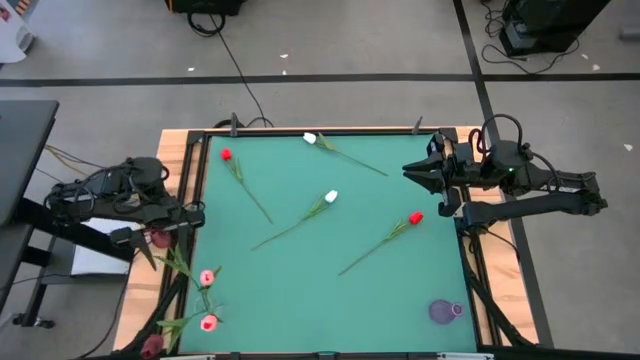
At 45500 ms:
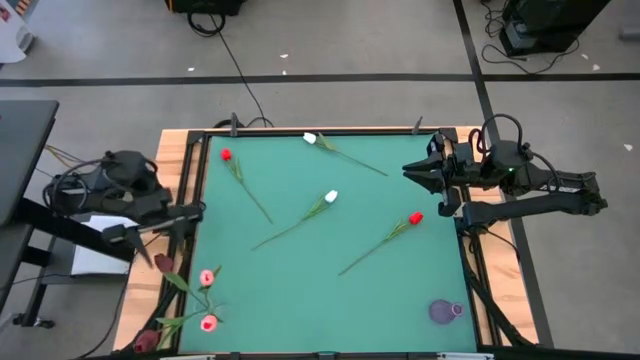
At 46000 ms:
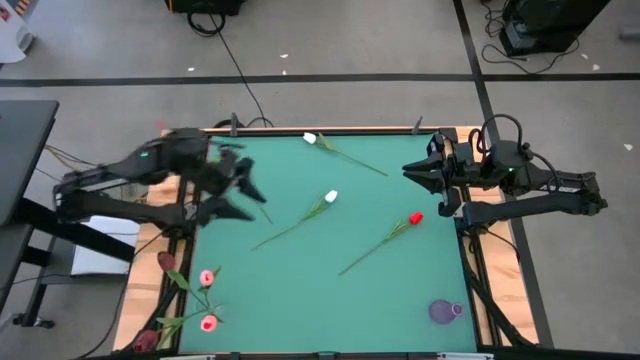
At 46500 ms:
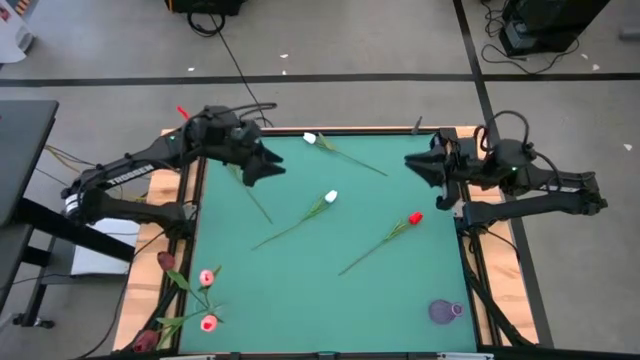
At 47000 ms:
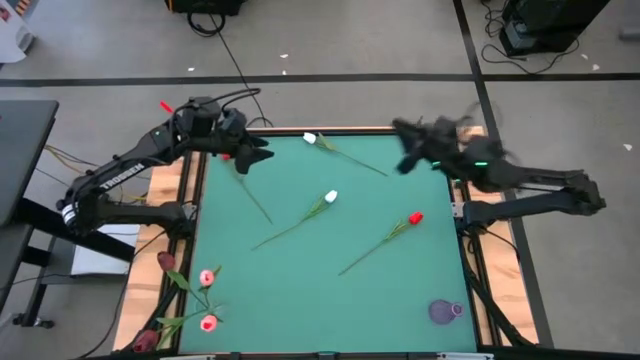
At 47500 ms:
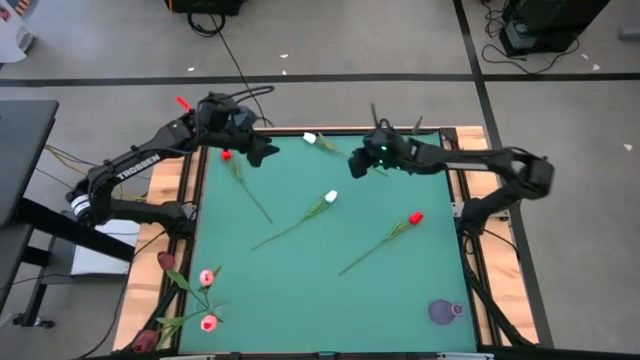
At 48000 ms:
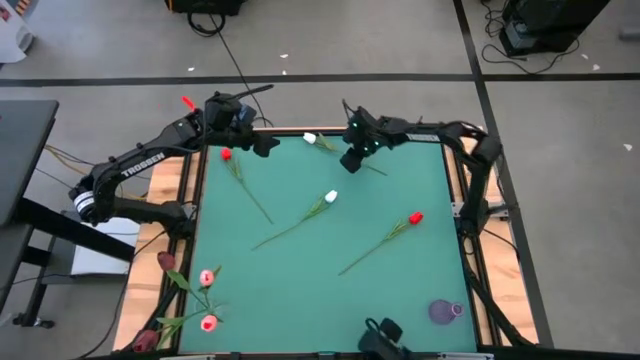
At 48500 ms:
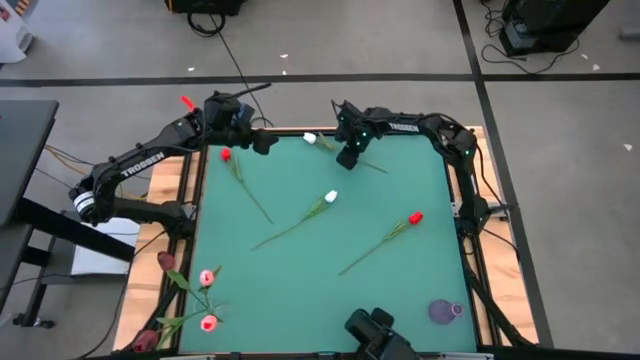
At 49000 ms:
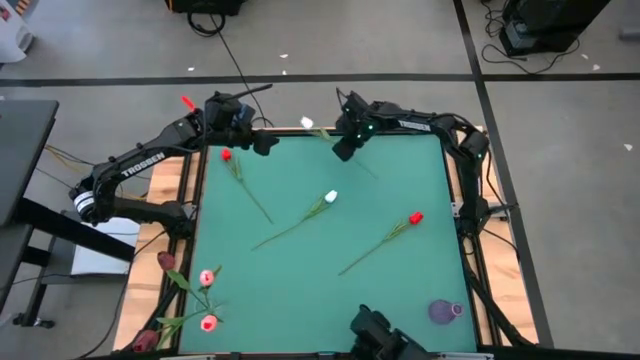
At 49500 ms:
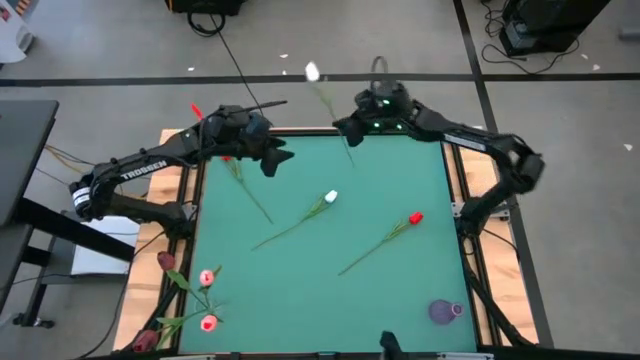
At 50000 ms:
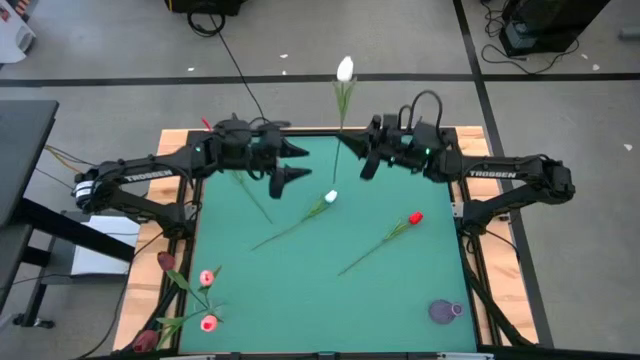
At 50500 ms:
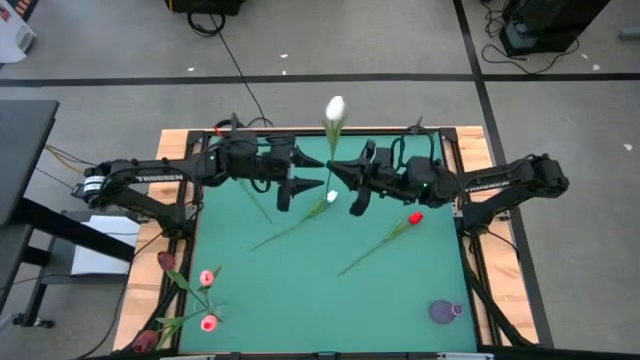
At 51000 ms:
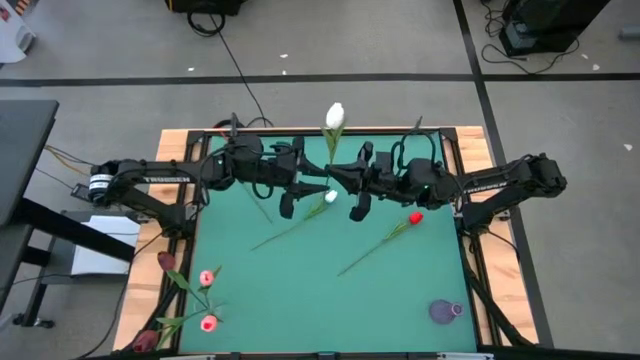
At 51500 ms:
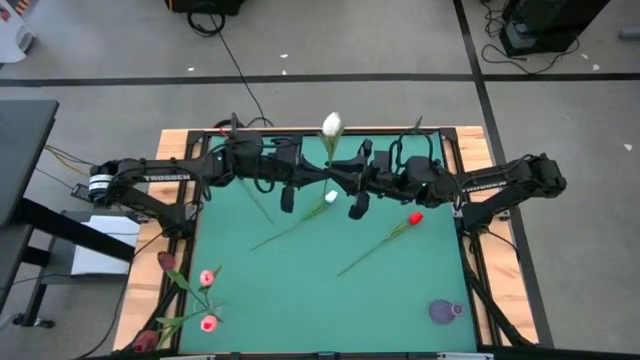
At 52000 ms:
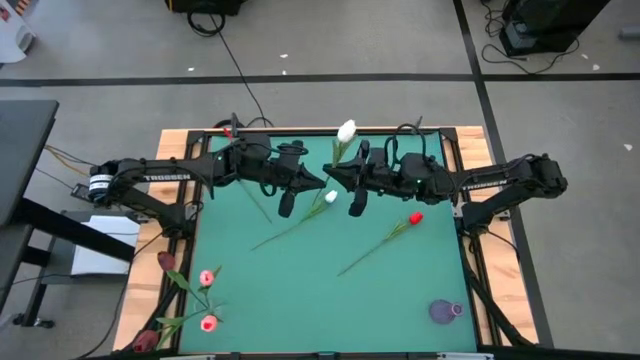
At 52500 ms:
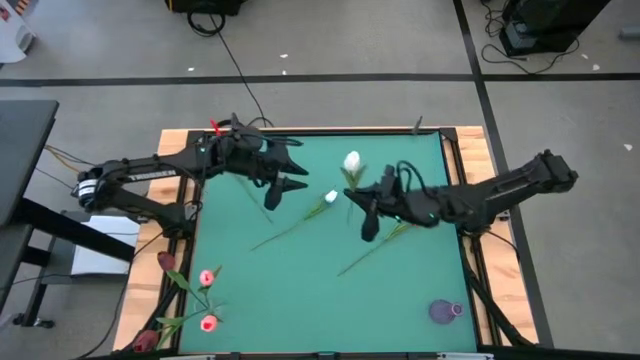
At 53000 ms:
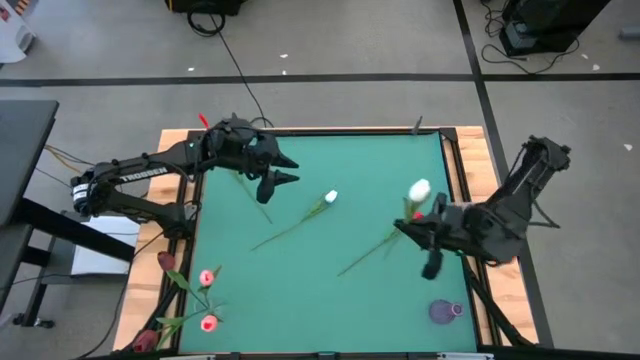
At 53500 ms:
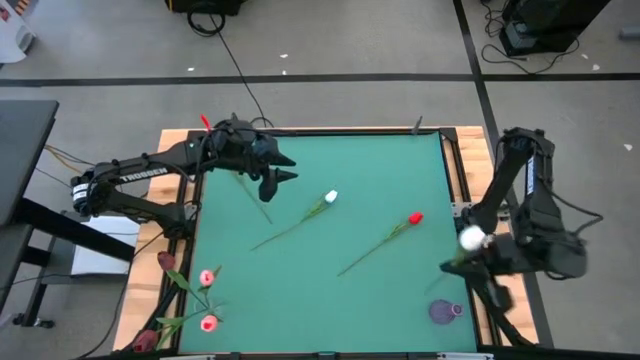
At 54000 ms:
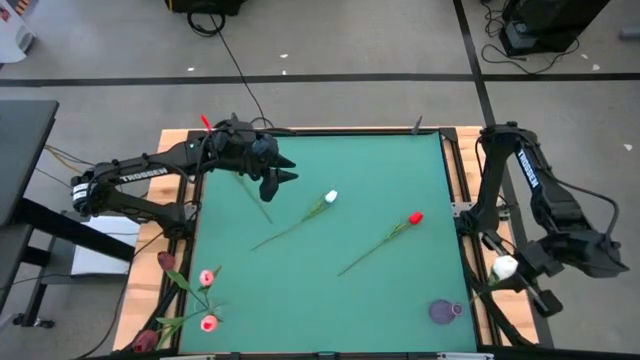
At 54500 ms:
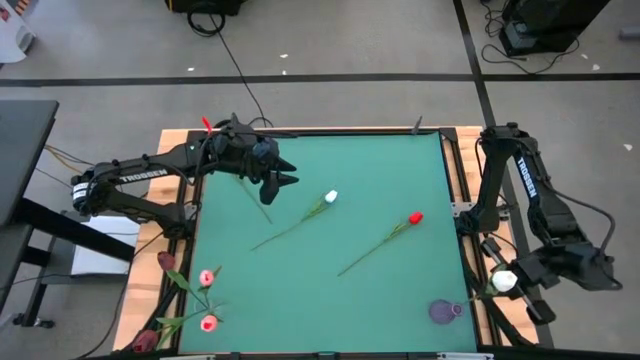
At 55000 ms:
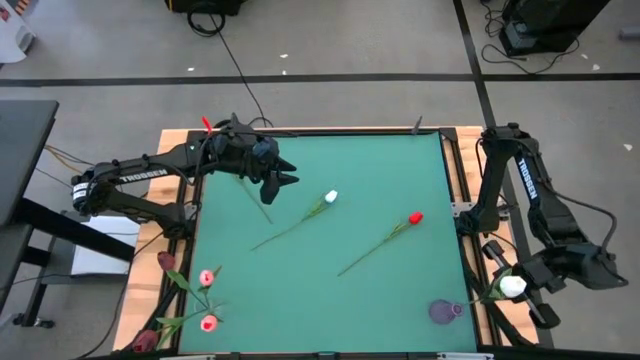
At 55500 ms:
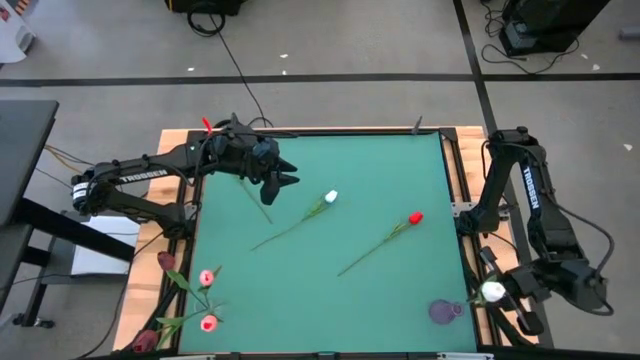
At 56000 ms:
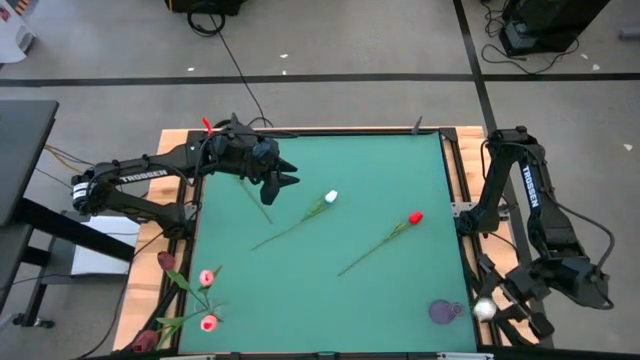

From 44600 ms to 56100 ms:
Task: Sort flowers into vase by color
Put the top white flower into the violet vase

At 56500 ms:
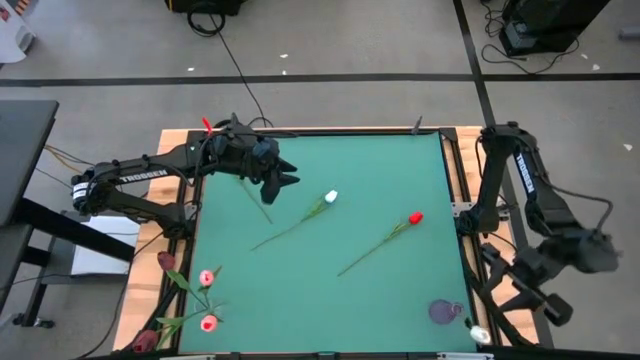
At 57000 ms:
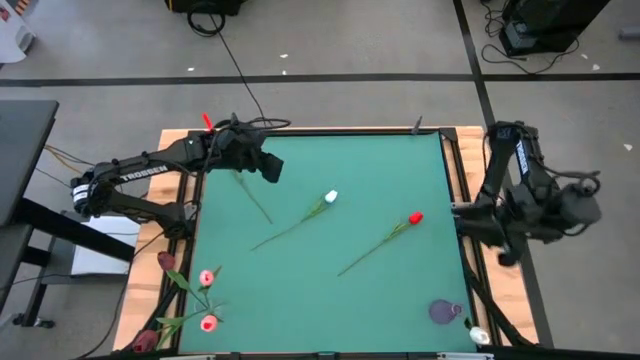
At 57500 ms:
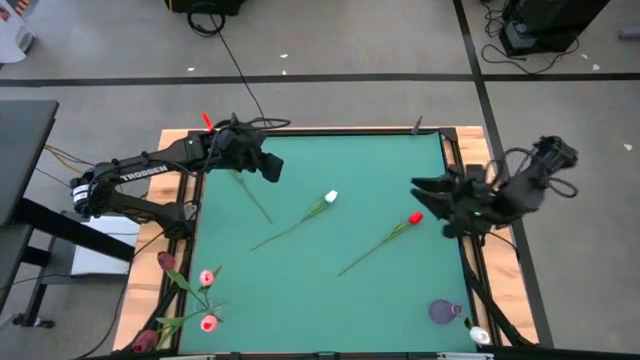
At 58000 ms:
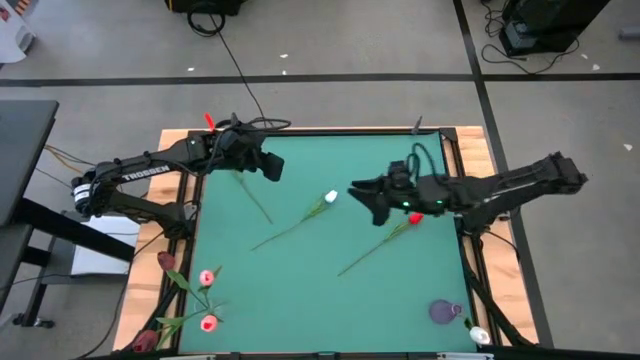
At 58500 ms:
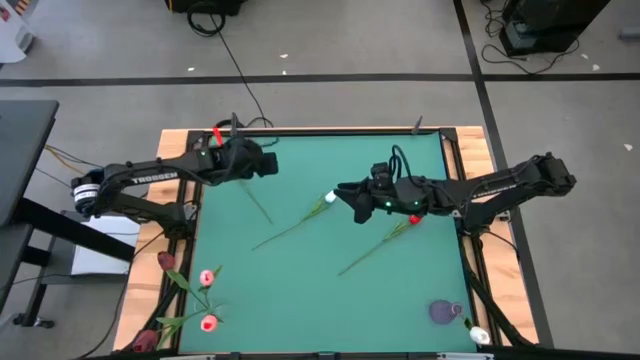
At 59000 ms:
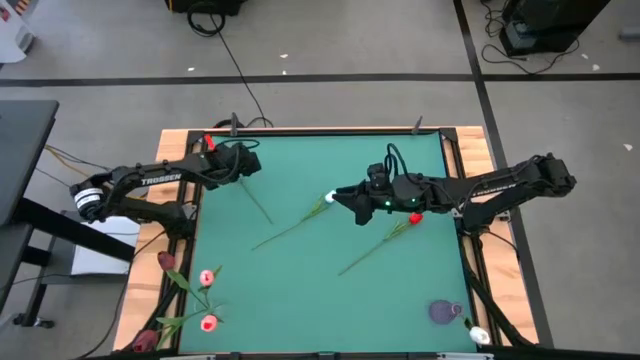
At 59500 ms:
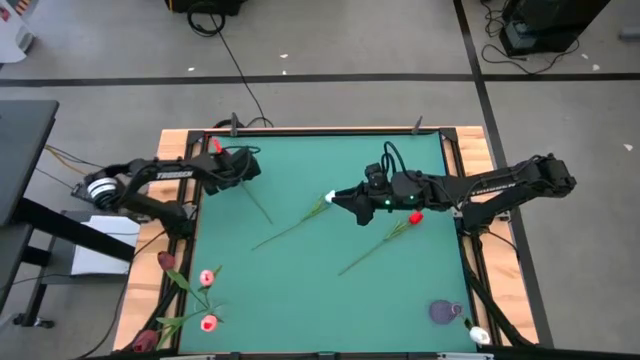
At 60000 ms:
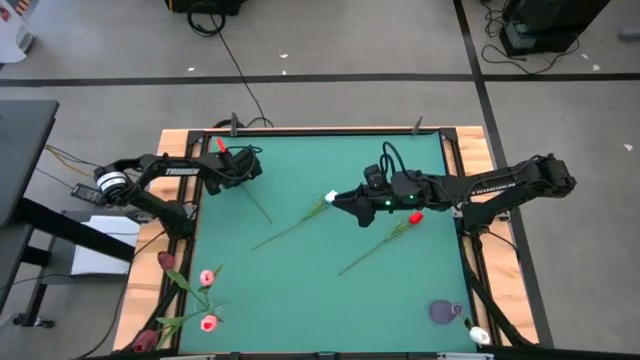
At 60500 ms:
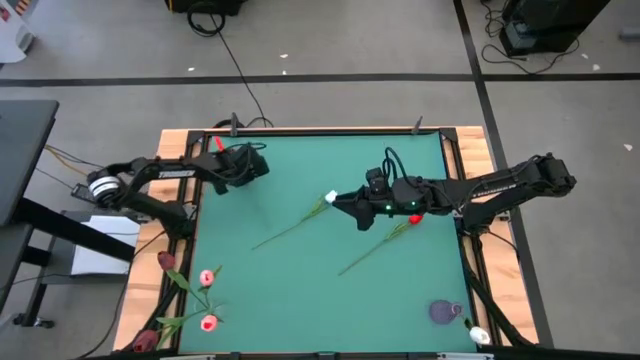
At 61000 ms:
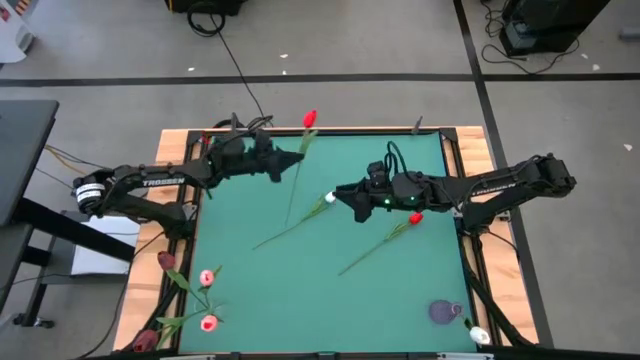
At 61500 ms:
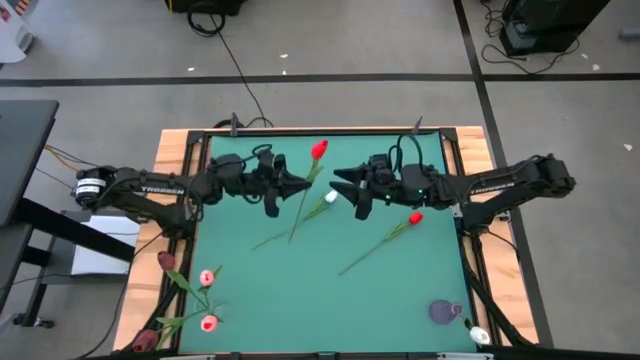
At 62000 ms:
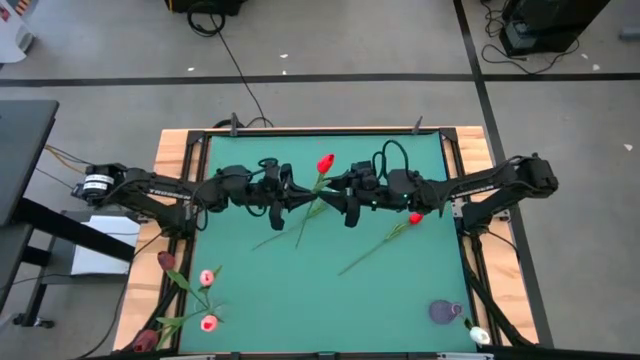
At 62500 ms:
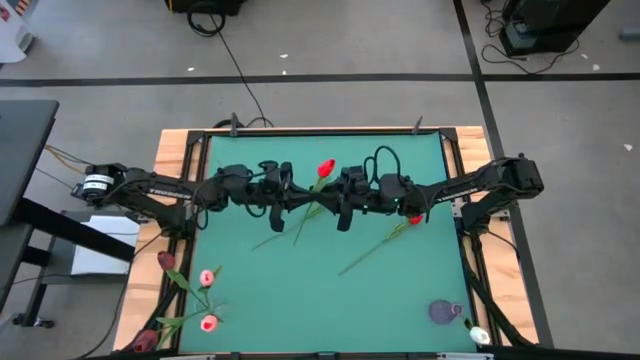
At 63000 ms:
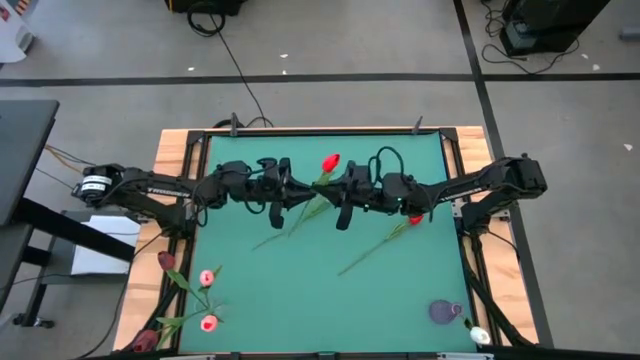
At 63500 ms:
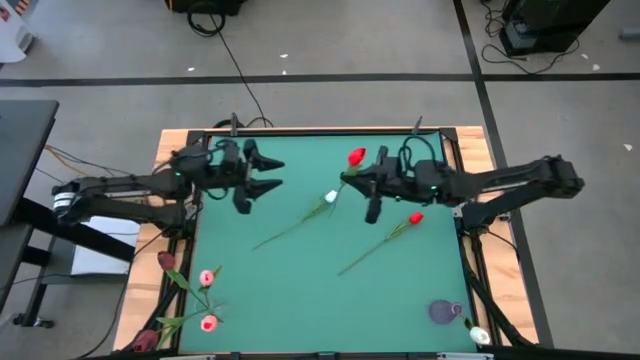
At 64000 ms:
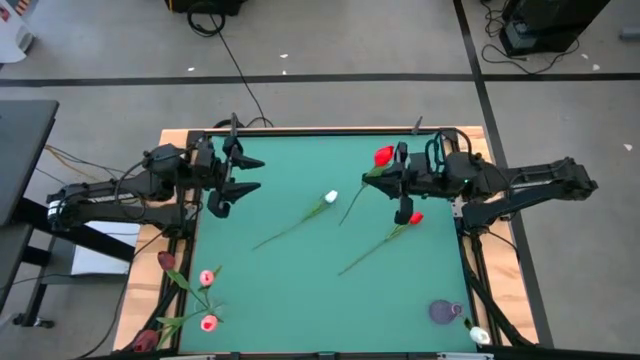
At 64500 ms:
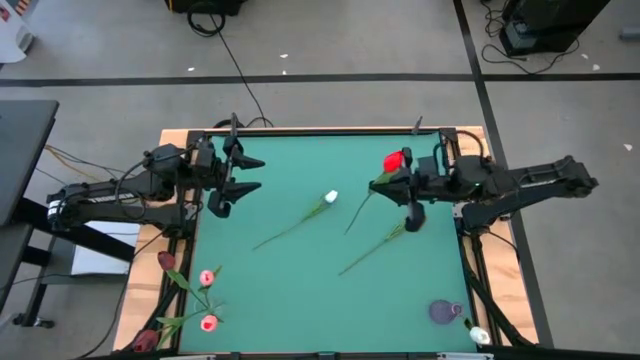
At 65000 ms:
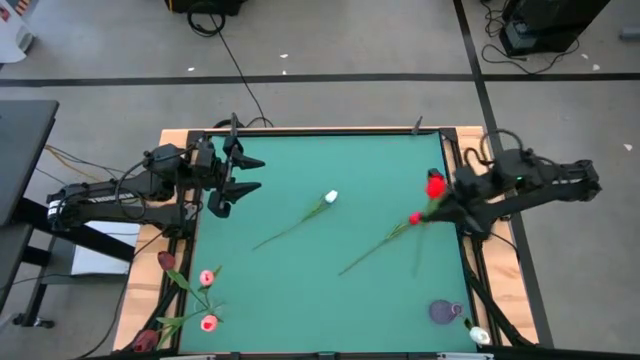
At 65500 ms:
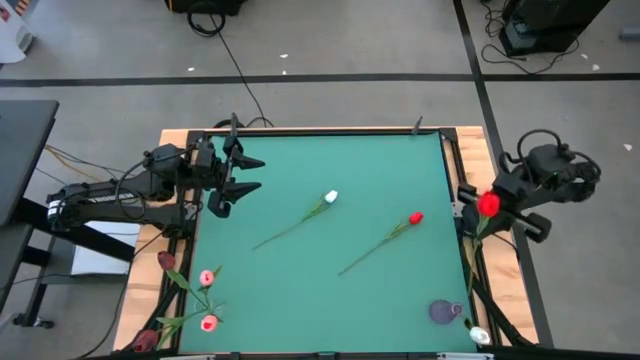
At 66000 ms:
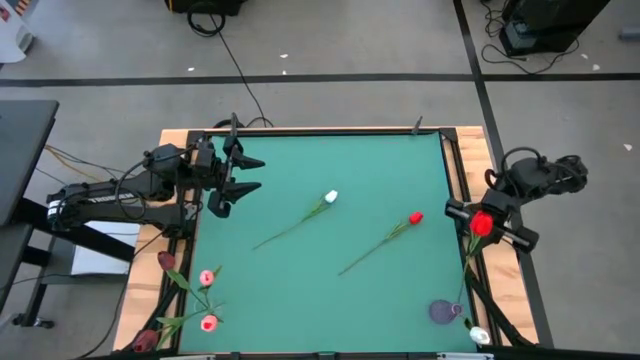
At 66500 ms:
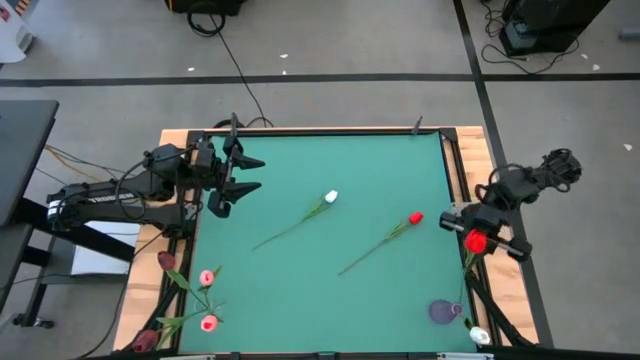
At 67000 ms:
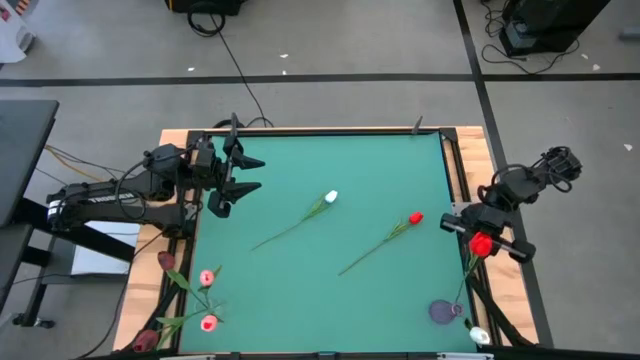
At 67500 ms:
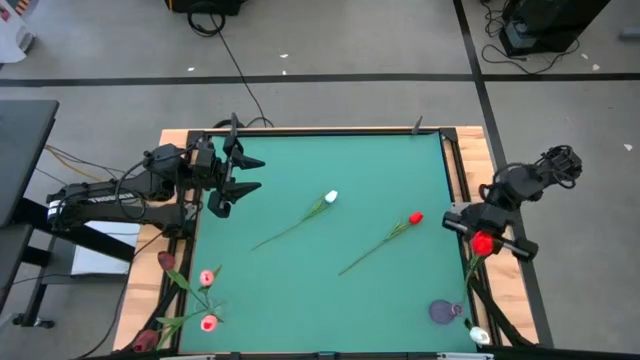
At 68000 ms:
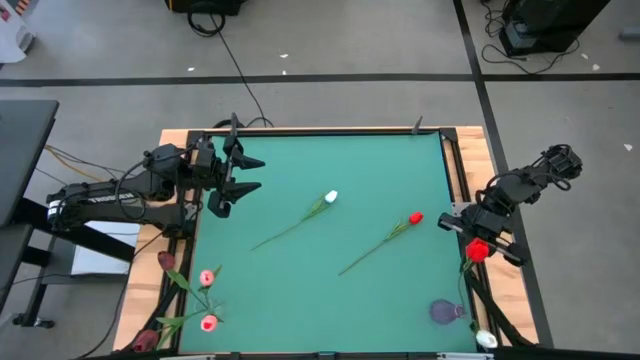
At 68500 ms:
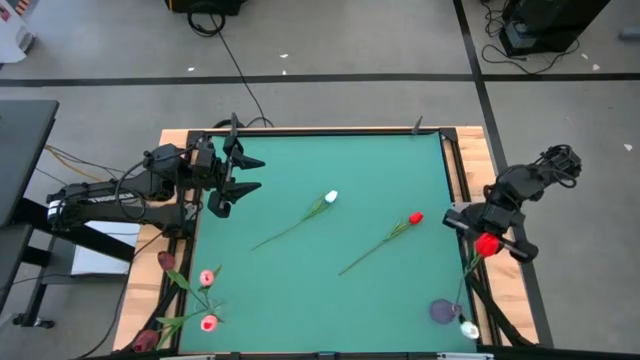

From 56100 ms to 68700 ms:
Put the left red flower into the violet vase
